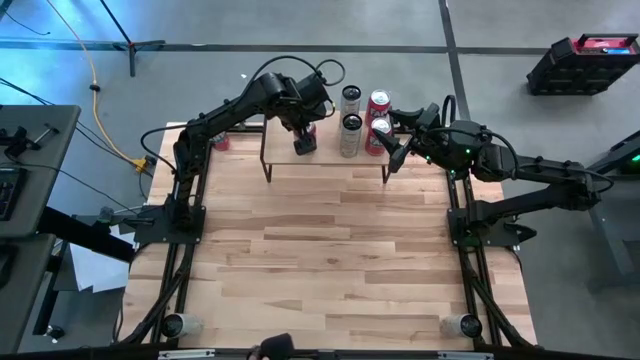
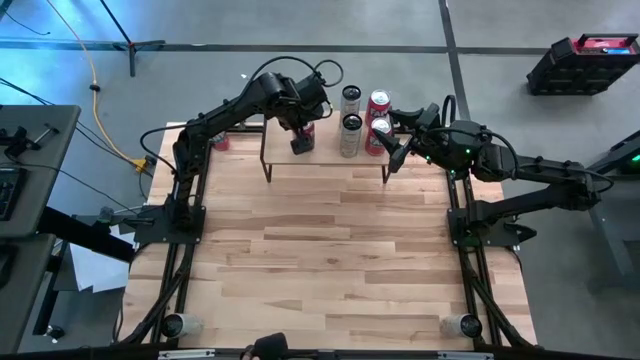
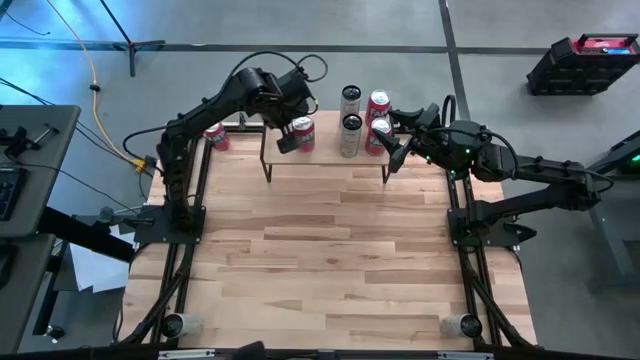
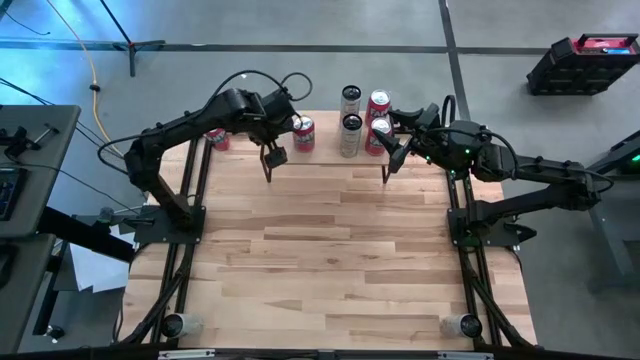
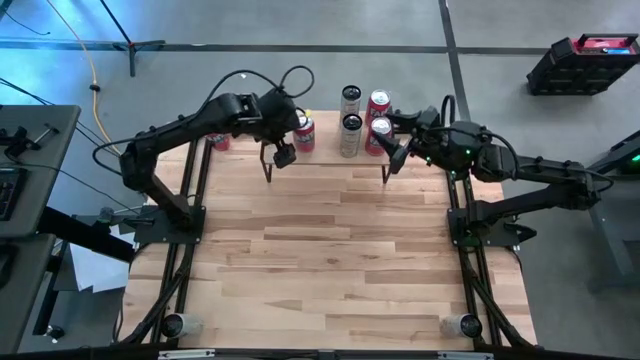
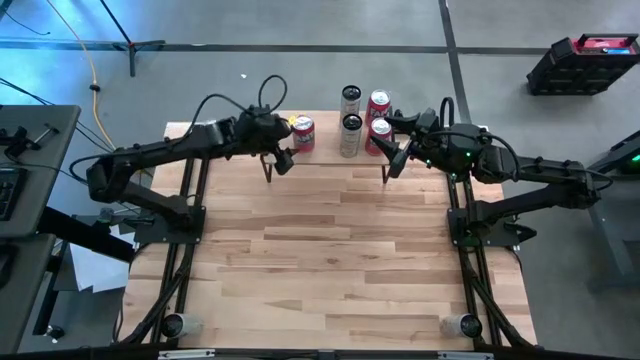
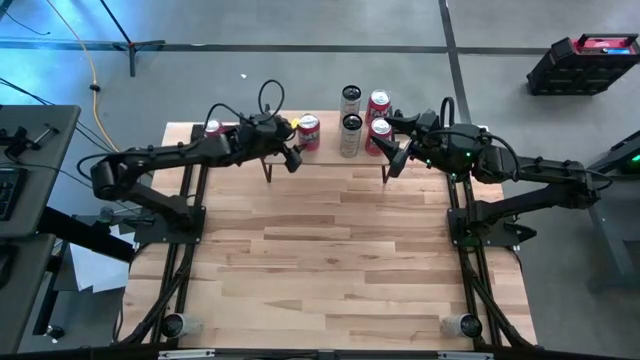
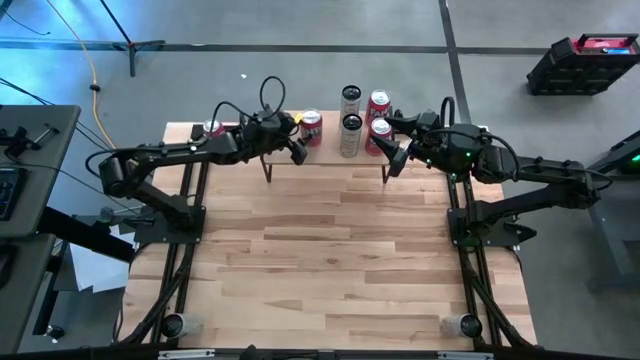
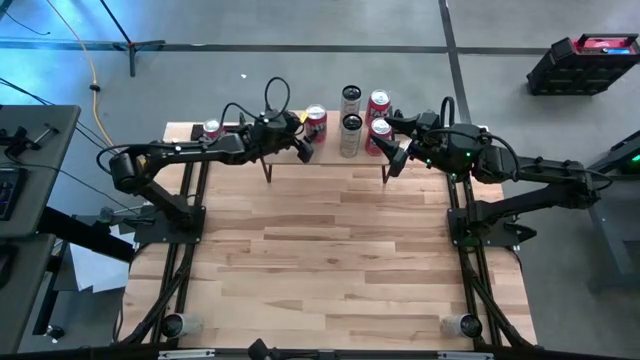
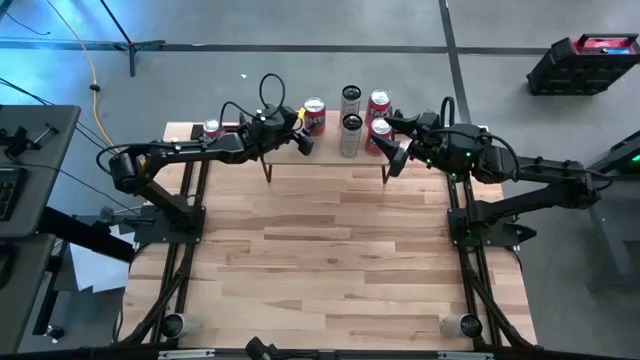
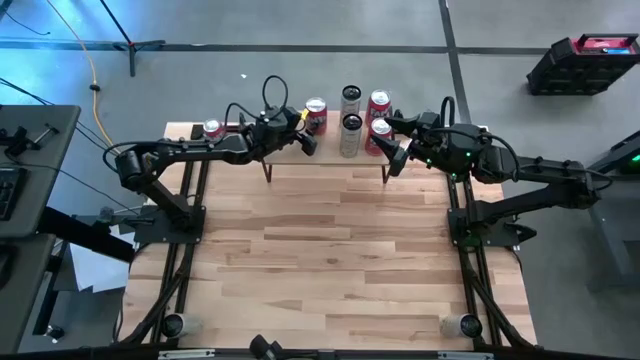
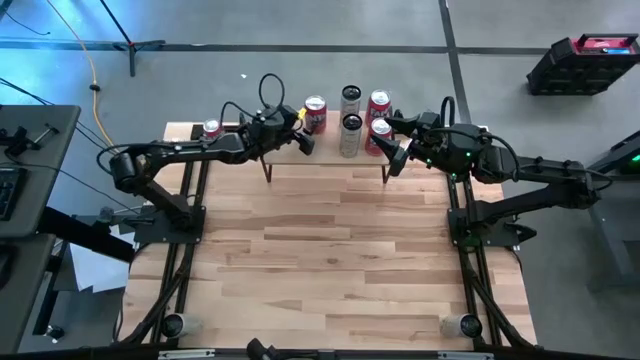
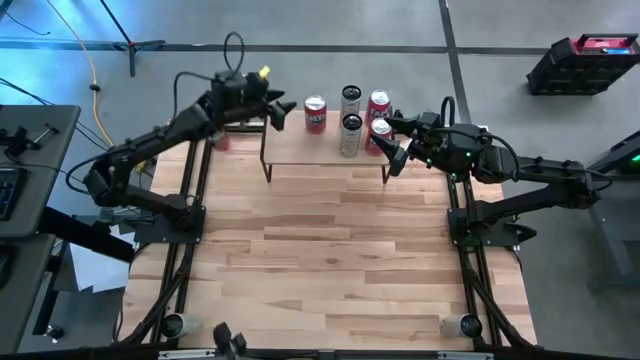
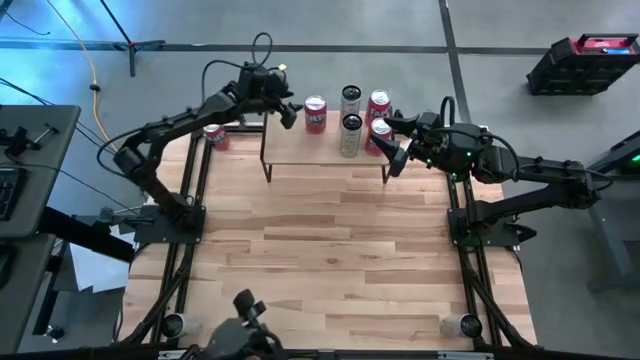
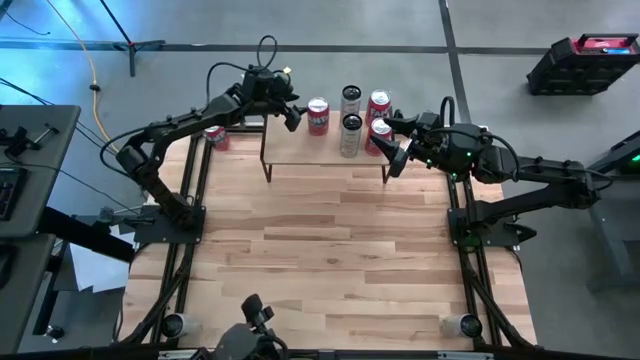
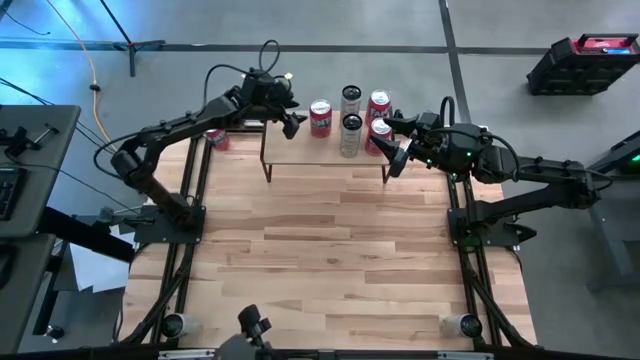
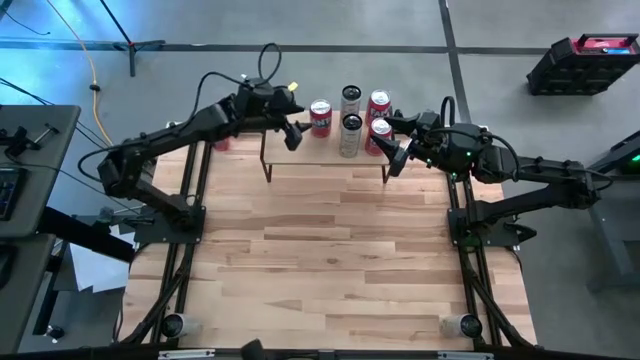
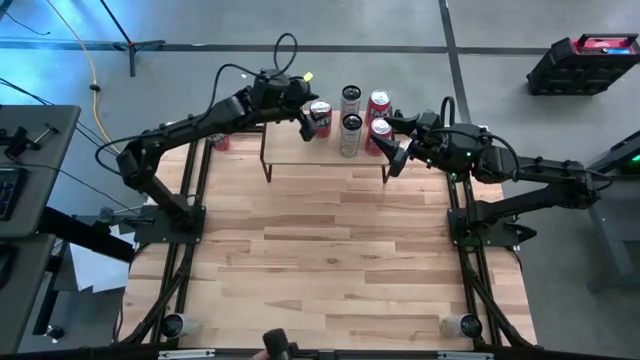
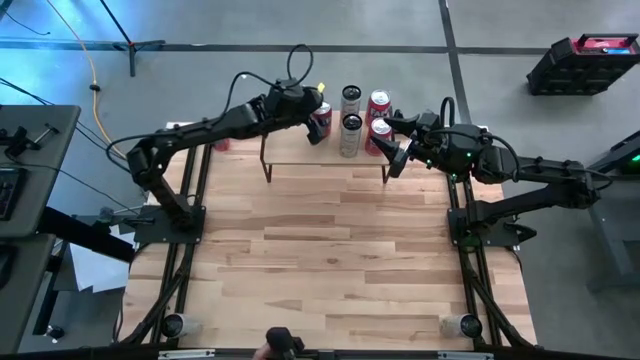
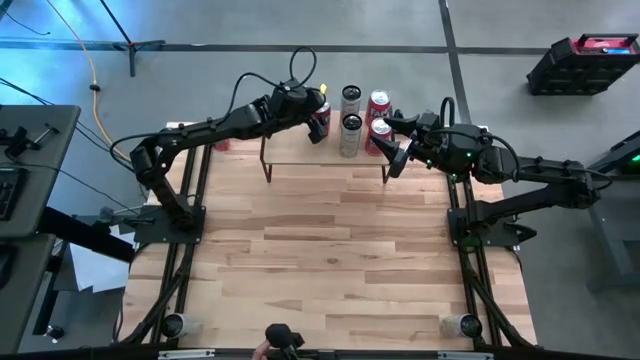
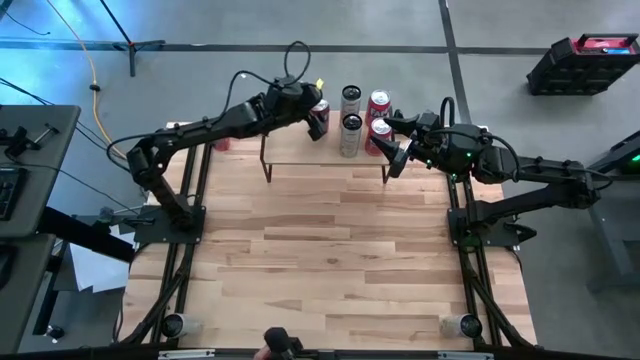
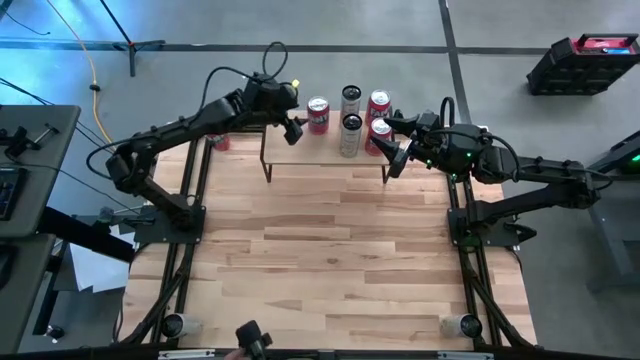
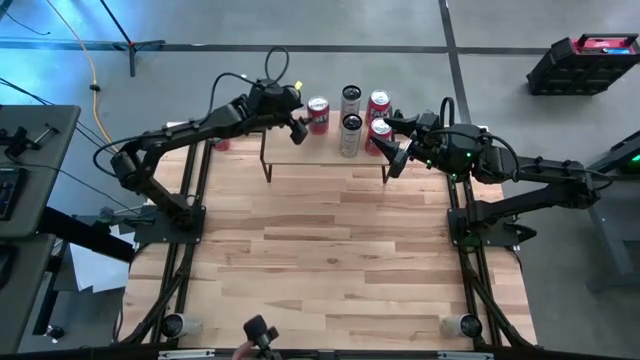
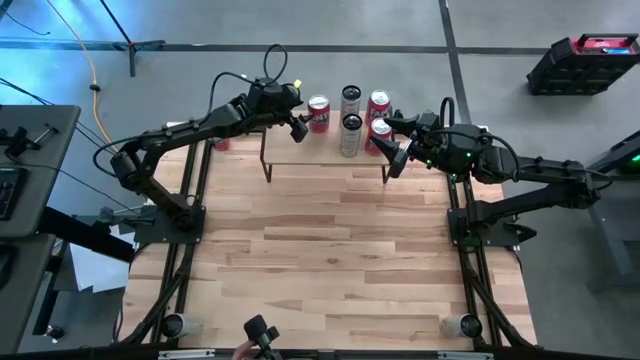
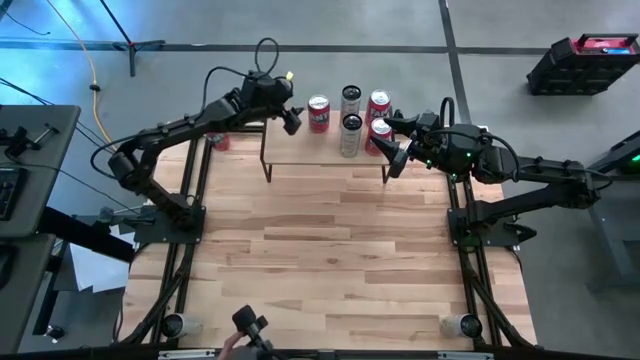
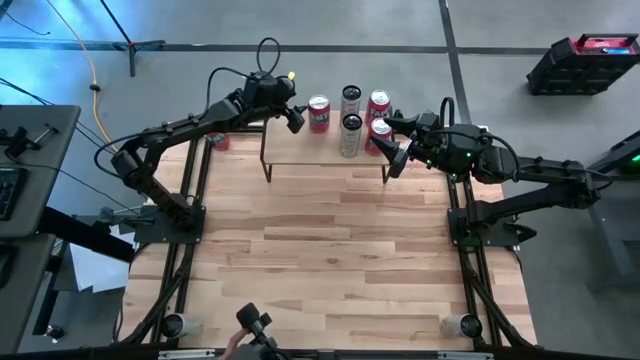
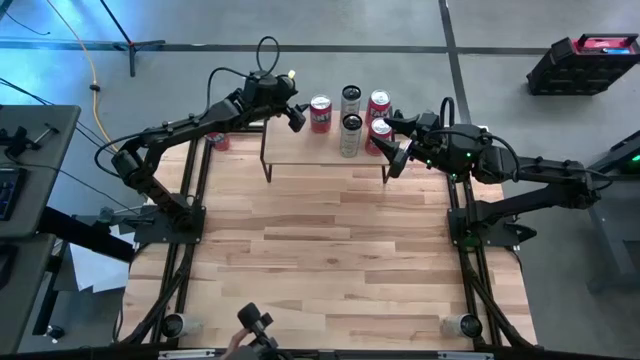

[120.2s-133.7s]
Task: Place canned beverage on shelf
Put the bottom red soda can on the shelf

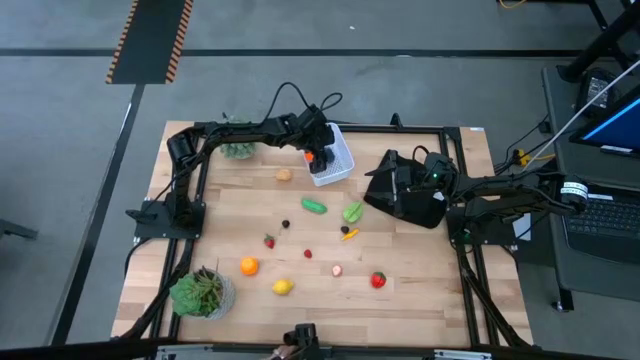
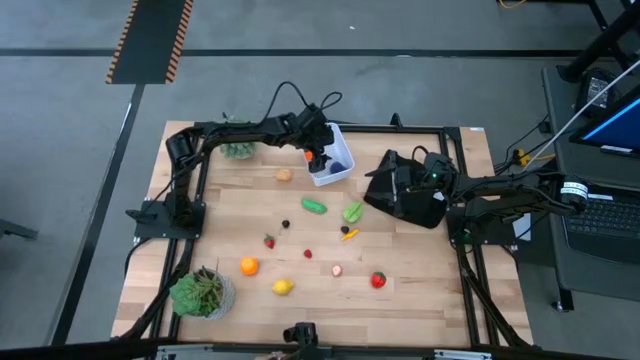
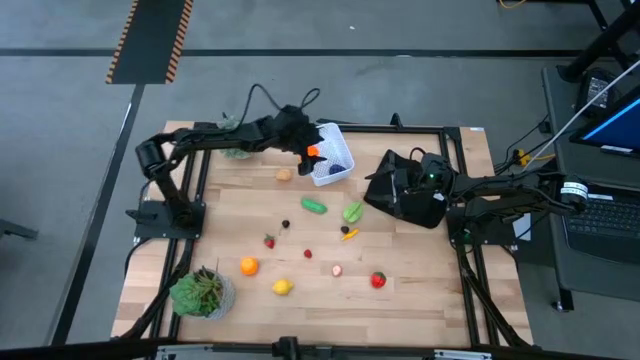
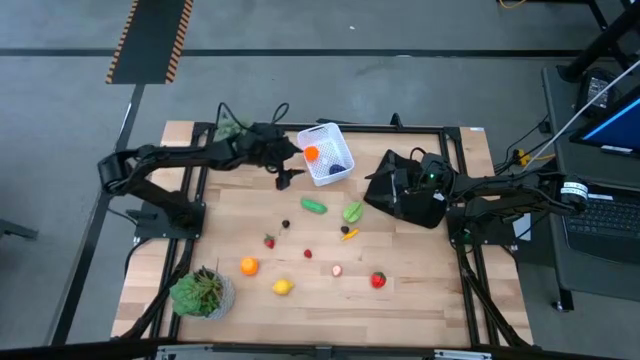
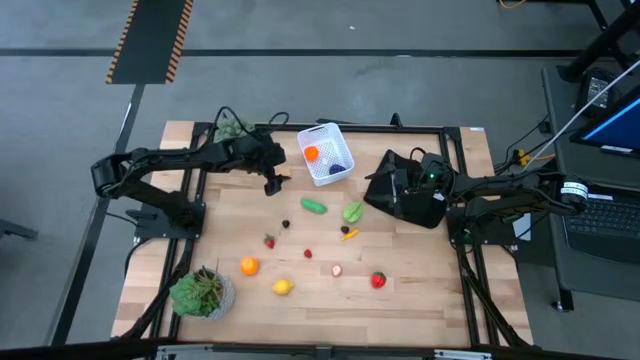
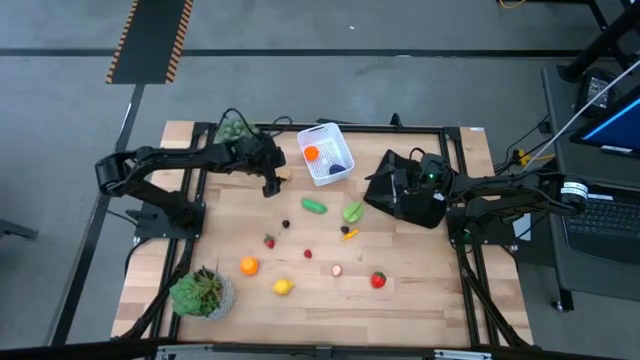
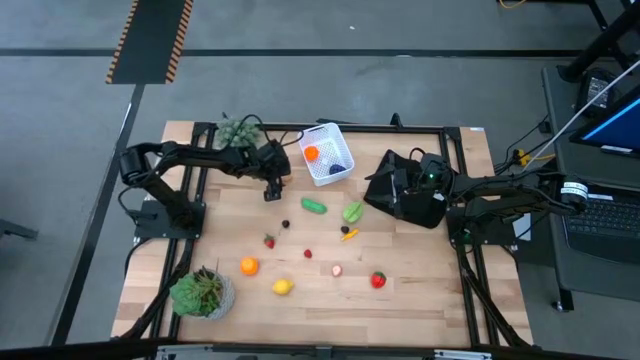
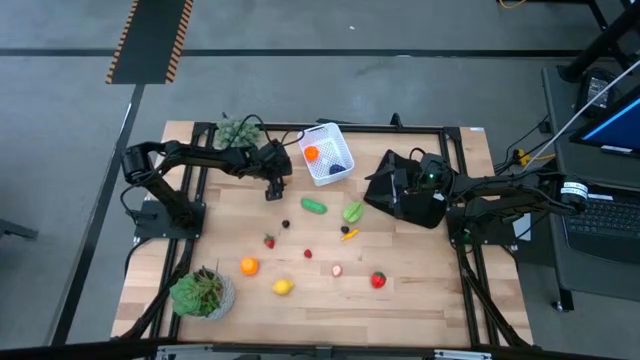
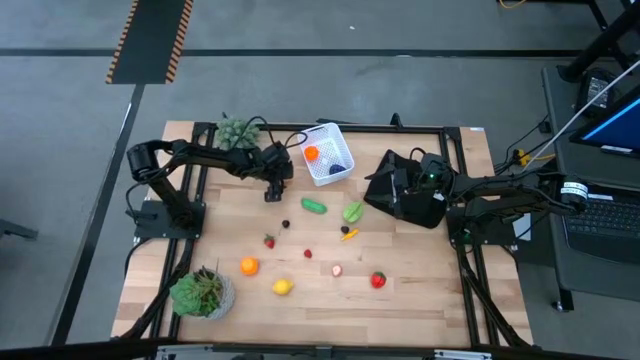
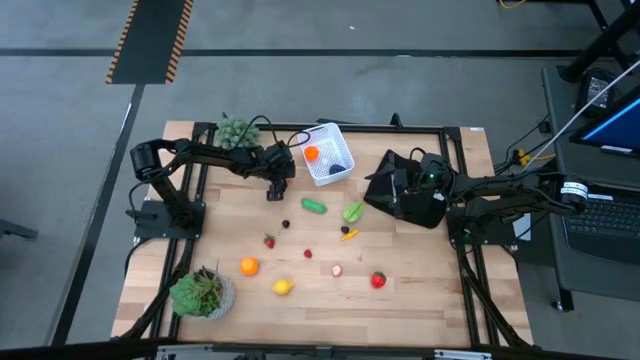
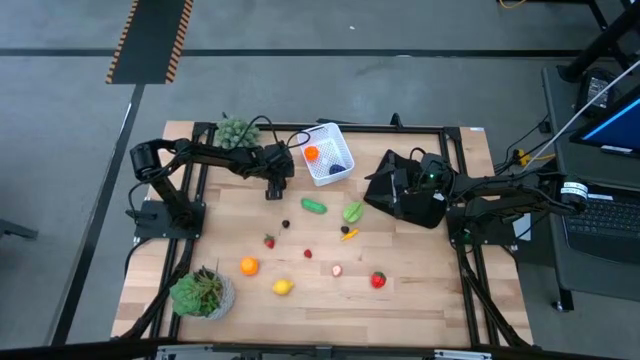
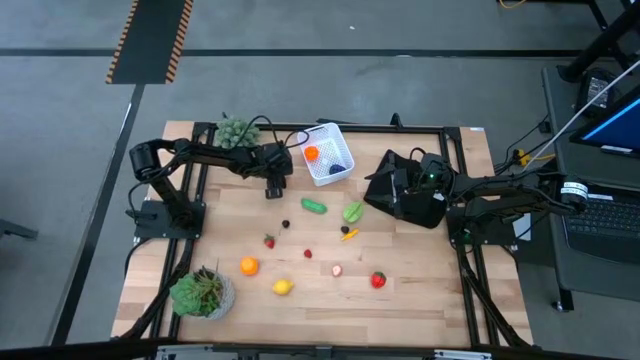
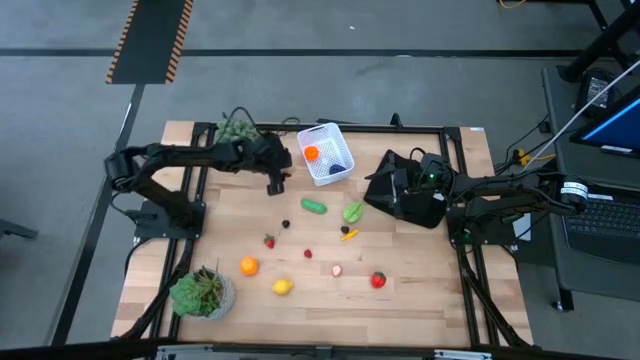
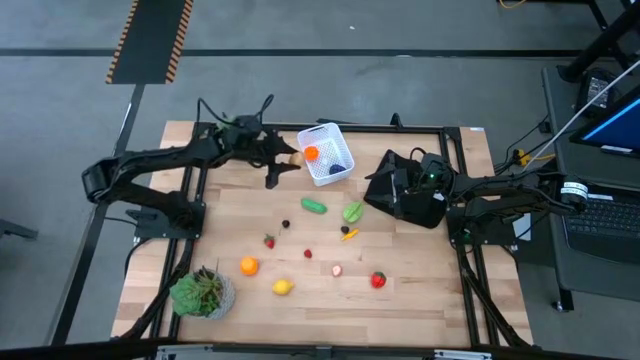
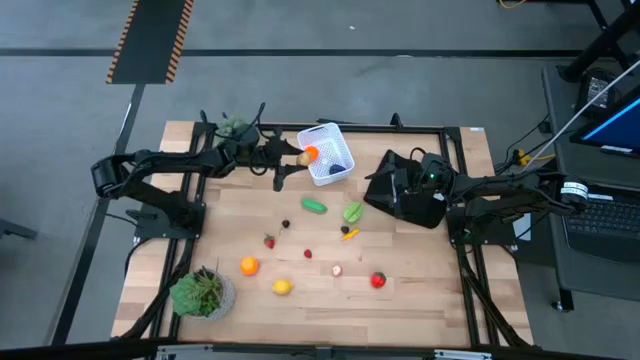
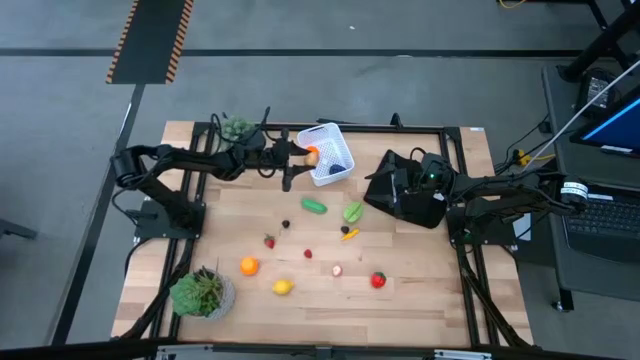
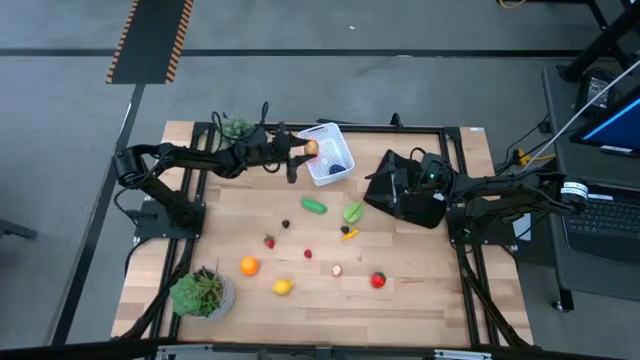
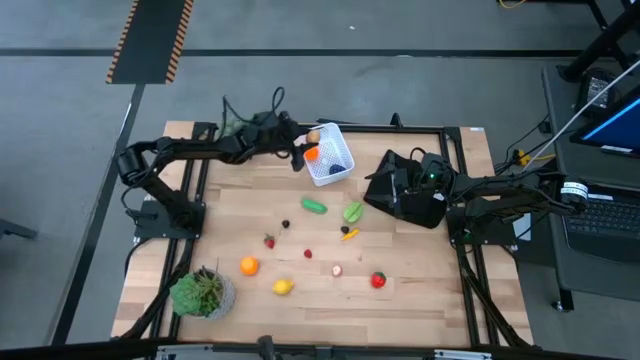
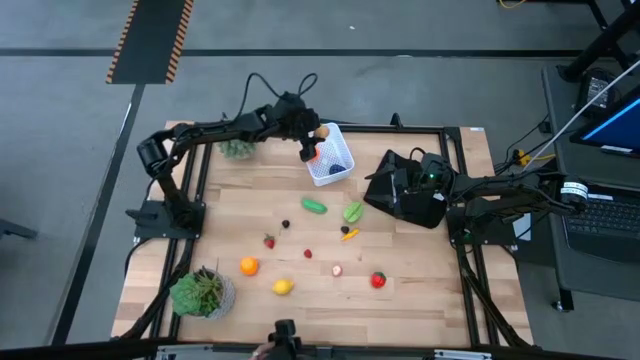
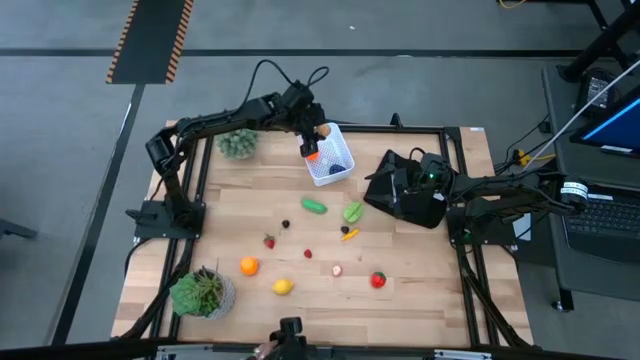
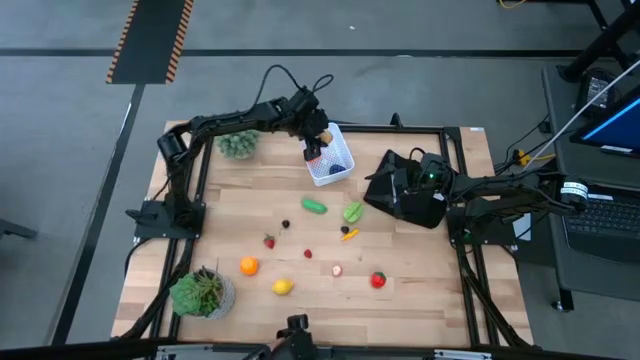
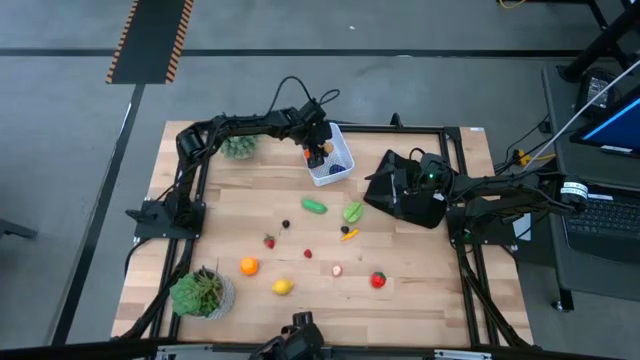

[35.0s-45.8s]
Task: Pick and placing Produce into tupperware
Put the potato into the basket
